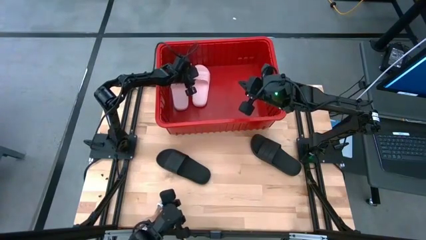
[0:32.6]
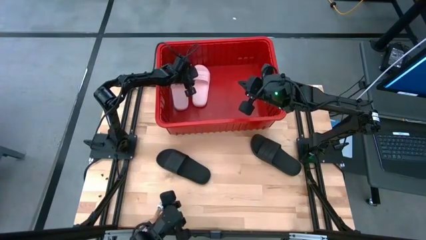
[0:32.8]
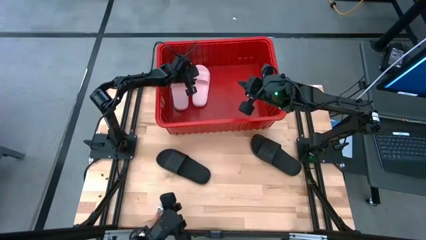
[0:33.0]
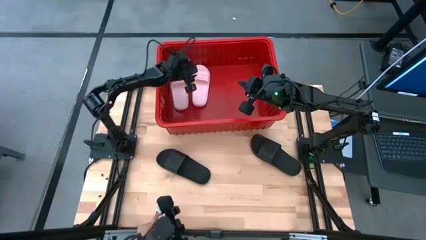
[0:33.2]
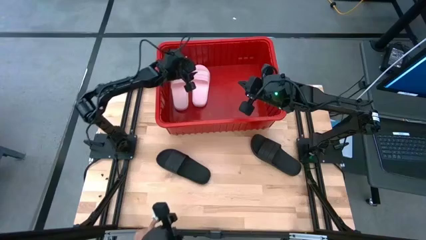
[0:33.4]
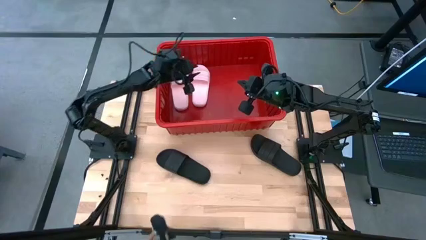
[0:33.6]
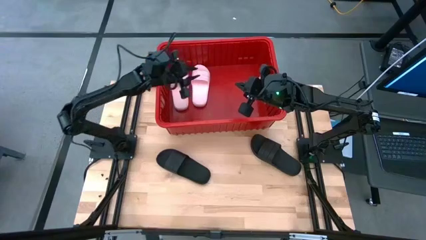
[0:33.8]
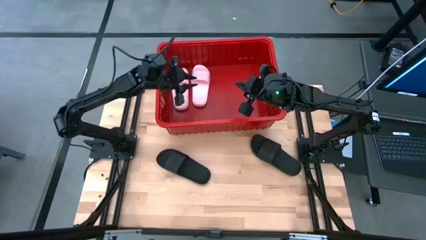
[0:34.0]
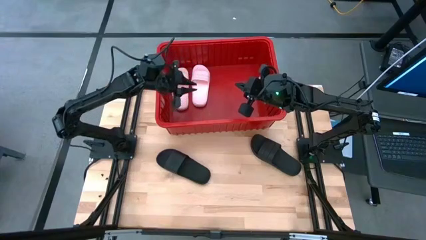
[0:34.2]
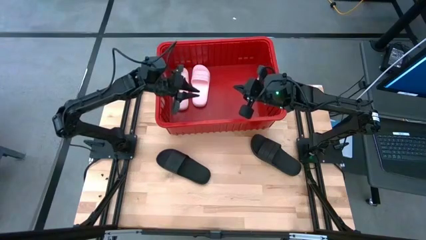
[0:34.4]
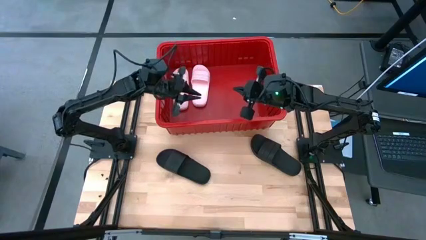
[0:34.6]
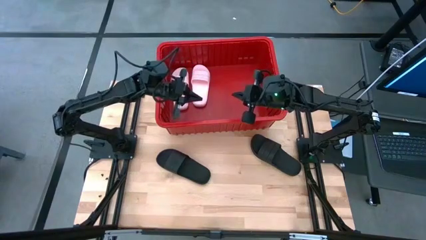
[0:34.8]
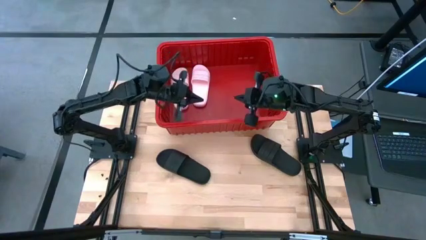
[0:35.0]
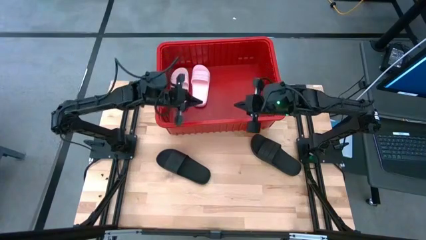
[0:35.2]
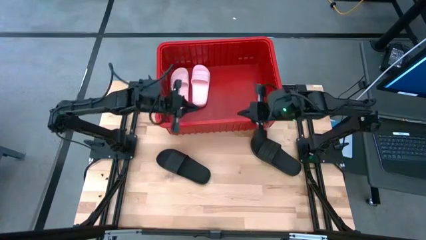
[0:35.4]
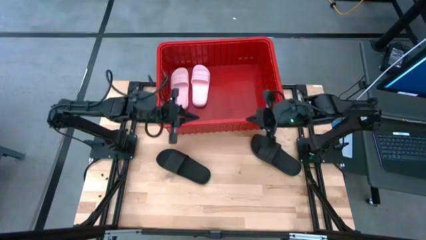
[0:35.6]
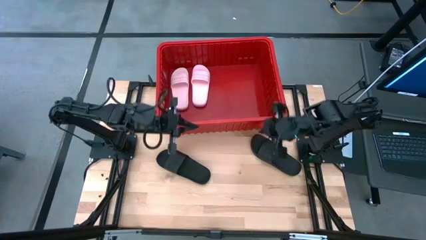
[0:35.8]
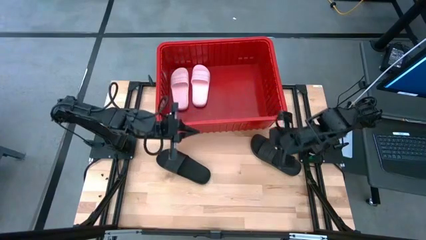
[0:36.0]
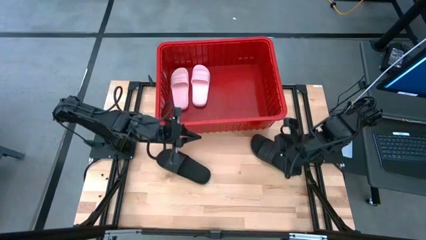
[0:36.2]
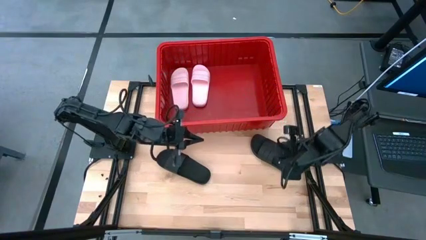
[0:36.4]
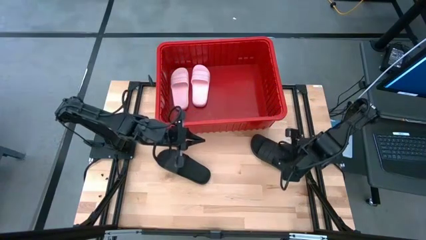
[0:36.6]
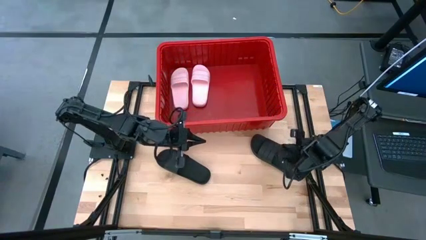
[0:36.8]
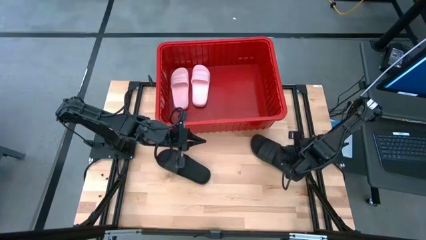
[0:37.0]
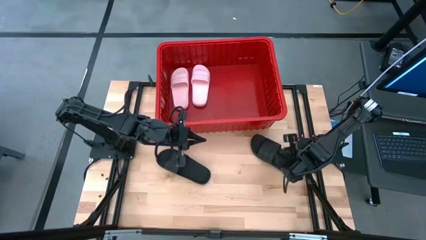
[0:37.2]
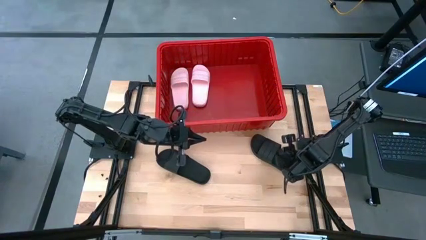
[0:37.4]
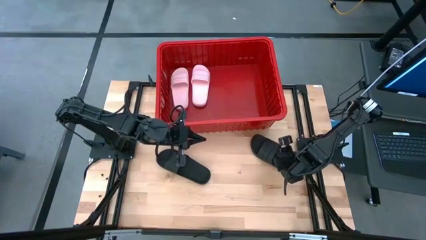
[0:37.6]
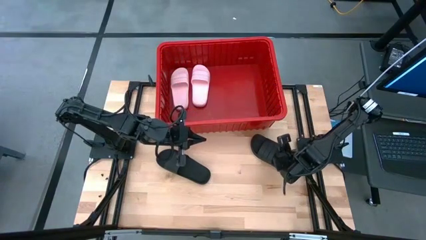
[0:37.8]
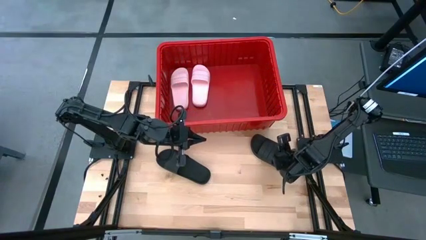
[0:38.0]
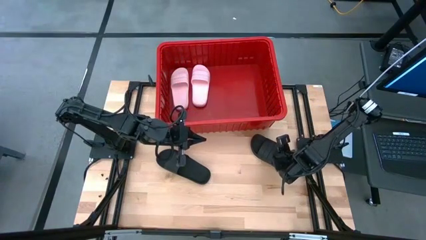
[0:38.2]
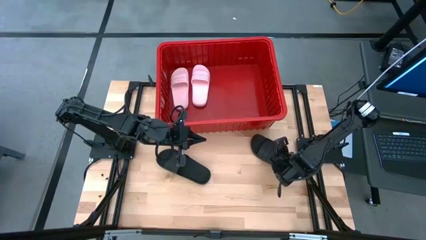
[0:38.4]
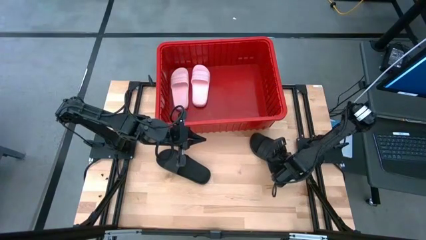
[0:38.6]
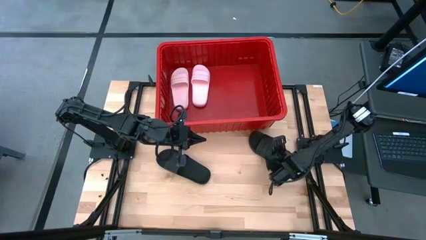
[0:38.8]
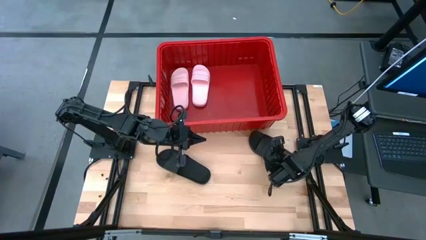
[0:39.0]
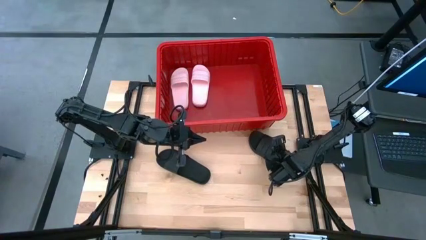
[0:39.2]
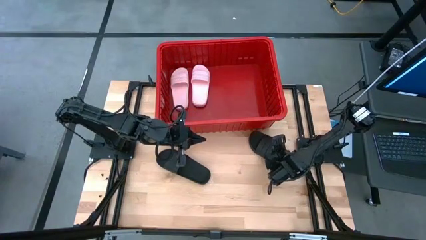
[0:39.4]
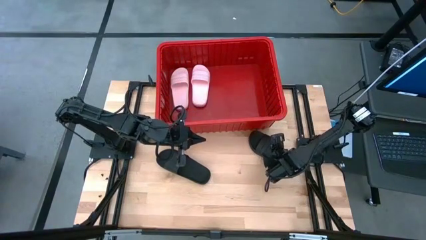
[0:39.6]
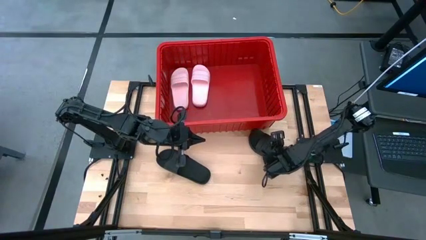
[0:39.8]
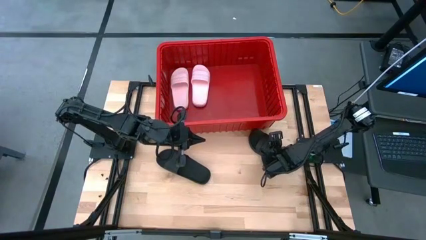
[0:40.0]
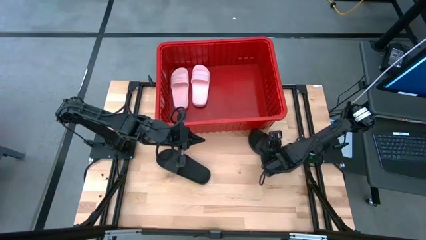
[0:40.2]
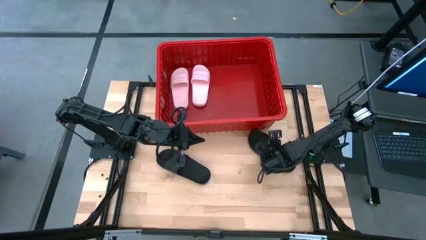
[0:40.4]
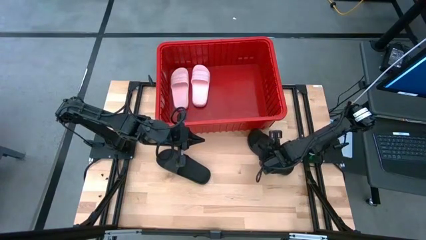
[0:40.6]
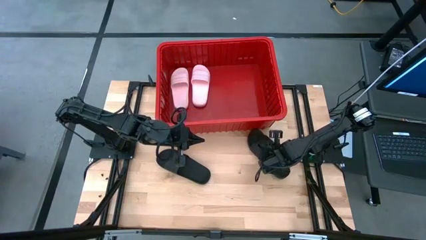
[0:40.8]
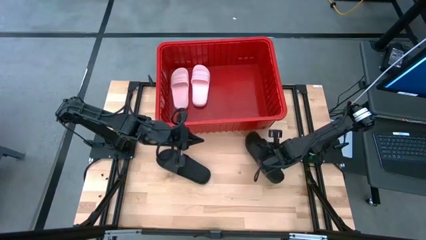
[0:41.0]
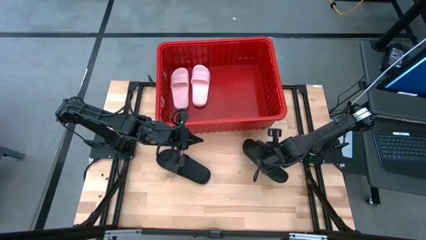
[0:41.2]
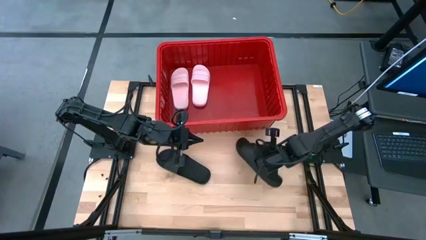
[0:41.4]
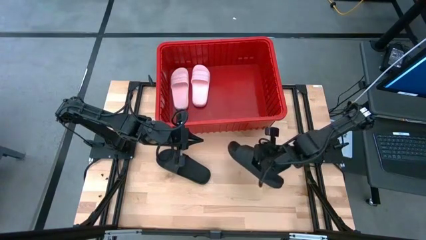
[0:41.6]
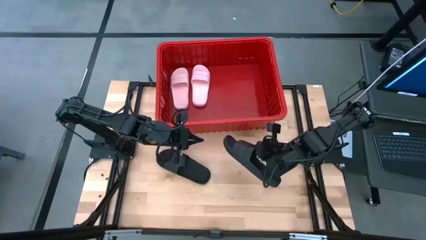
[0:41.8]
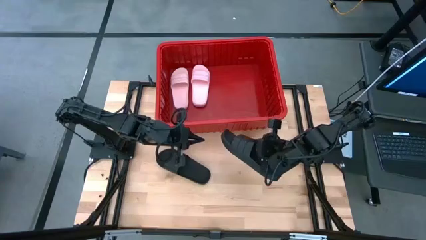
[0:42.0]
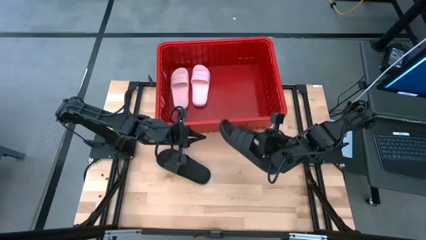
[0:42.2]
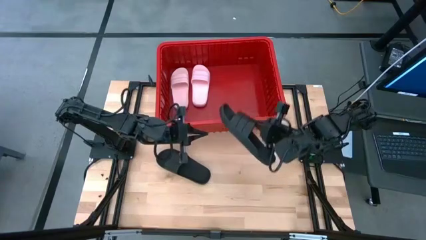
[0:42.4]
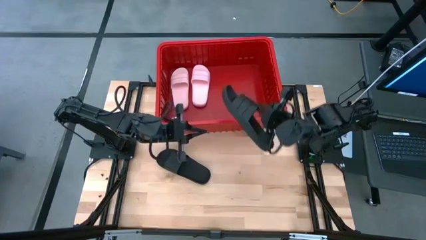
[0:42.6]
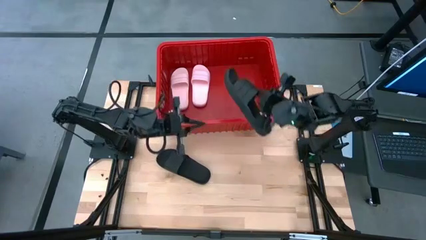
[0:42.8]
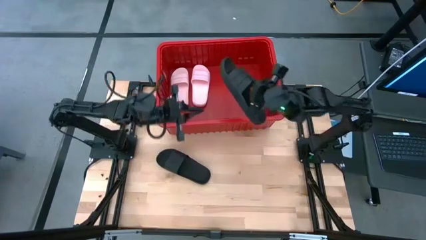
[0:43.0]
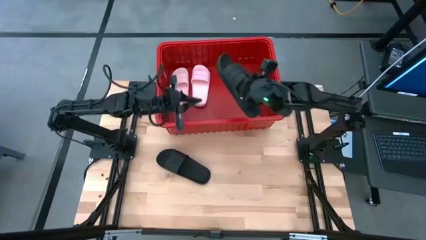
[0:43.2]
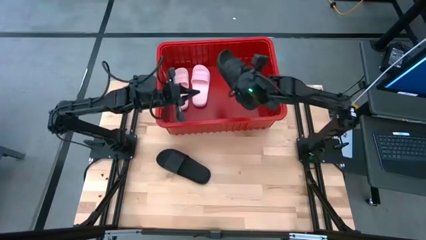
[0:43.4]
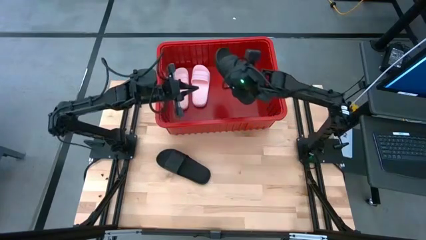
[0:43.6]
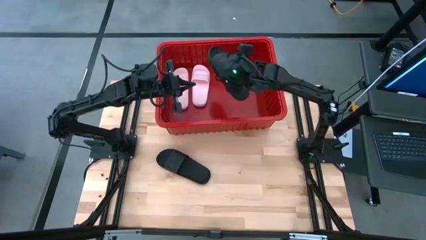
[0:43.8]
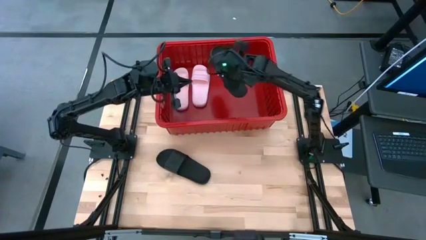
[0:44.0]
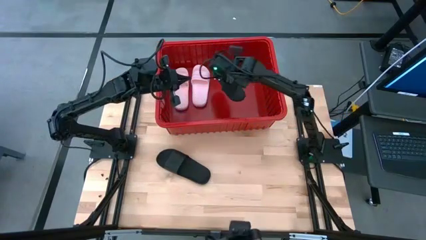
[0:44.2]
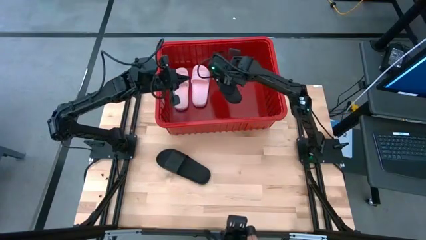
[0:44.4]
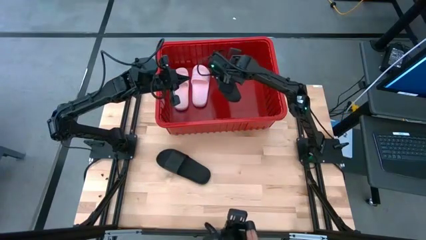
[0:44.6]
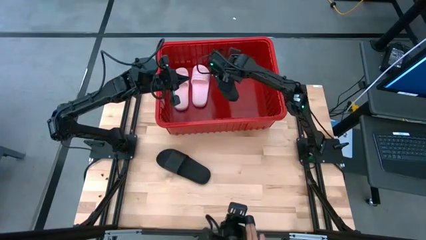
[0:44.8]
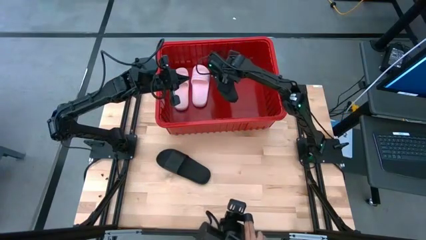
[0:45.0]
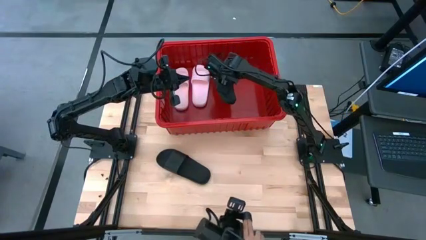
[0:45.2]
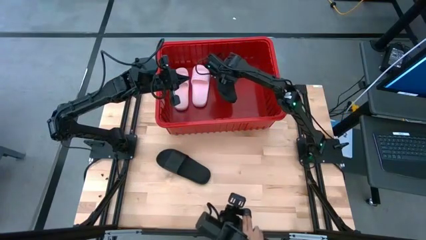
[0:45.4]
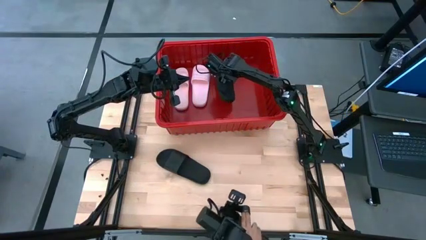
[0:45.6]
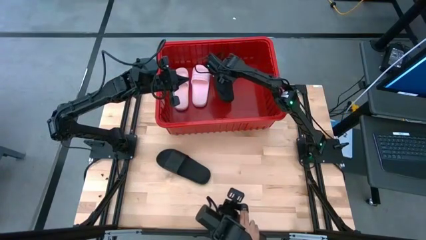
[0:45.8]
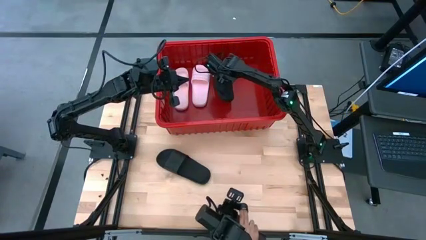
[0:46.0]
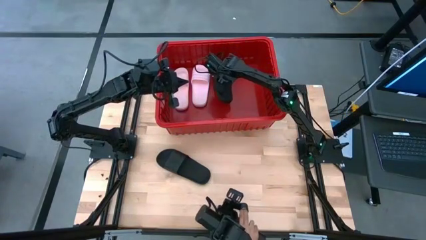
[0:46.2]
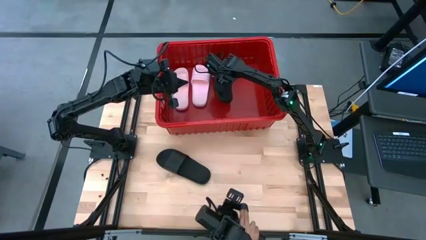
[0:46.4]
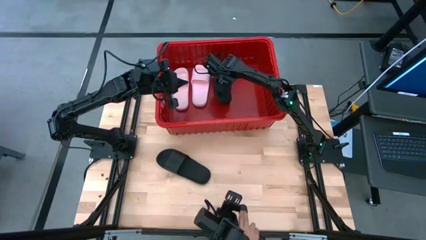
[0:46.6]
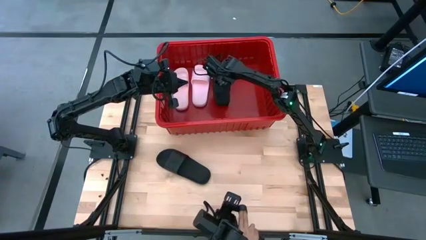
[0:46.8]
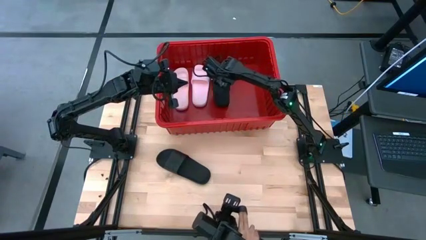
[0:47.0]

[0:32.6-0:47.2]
Task: Pick and place slides into bin
Put the right black slide into the red bin

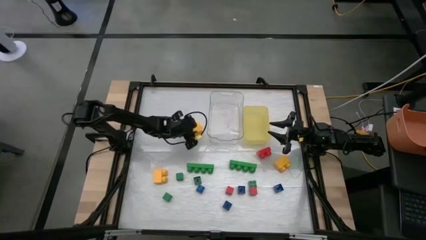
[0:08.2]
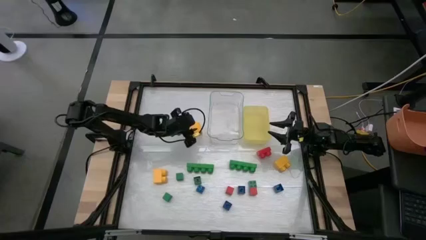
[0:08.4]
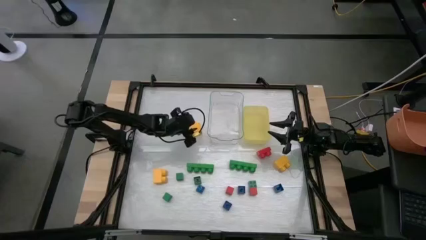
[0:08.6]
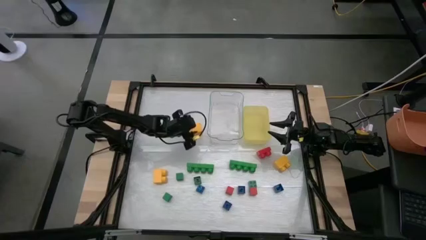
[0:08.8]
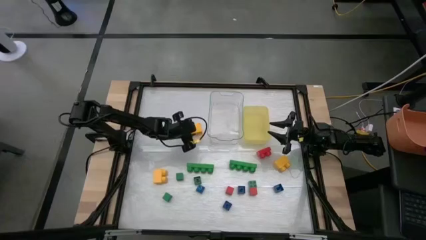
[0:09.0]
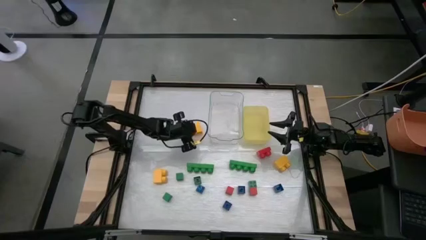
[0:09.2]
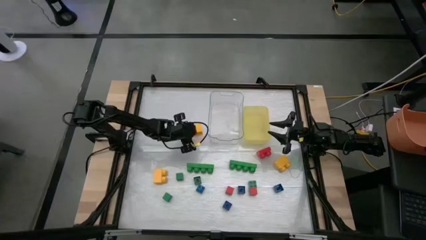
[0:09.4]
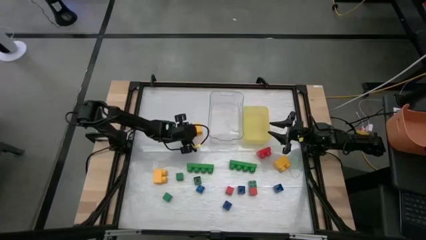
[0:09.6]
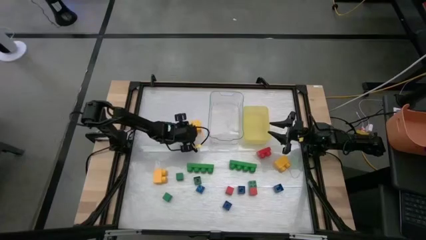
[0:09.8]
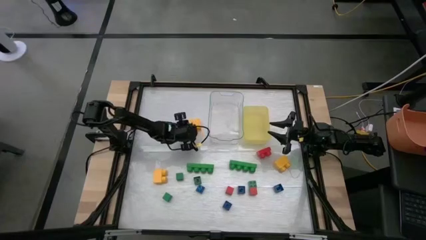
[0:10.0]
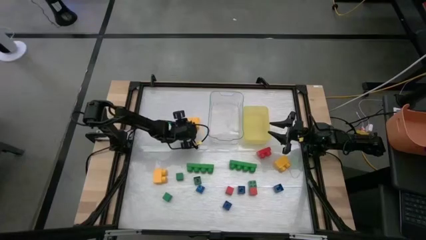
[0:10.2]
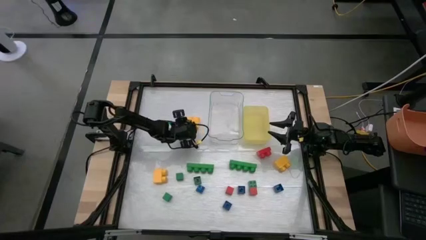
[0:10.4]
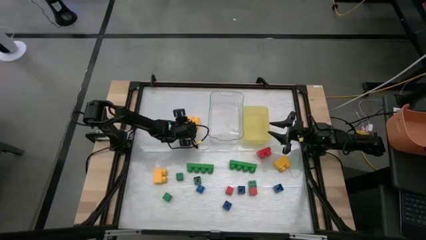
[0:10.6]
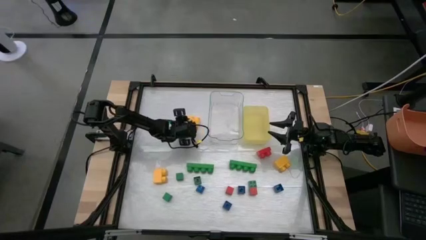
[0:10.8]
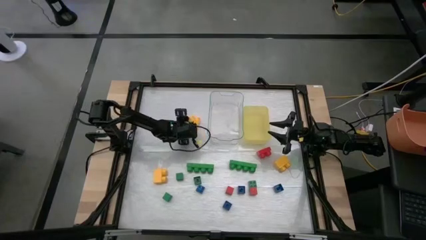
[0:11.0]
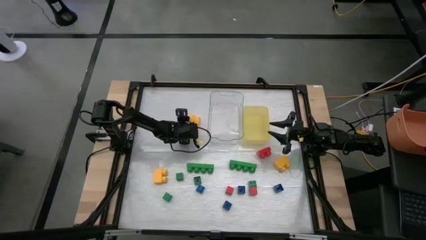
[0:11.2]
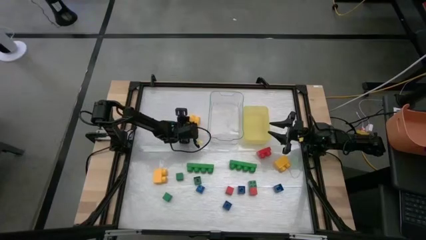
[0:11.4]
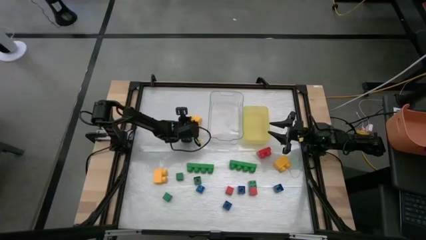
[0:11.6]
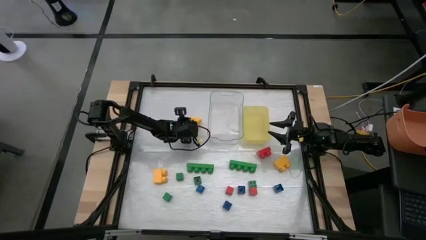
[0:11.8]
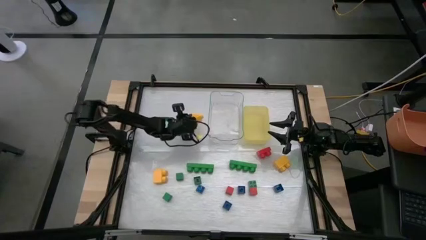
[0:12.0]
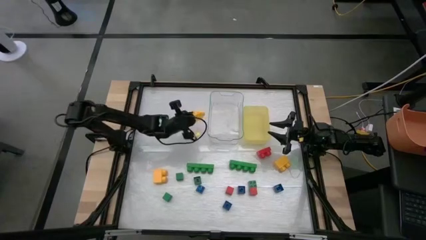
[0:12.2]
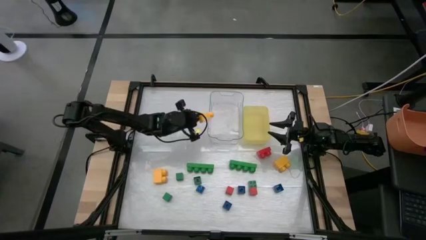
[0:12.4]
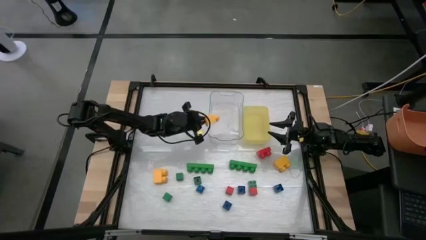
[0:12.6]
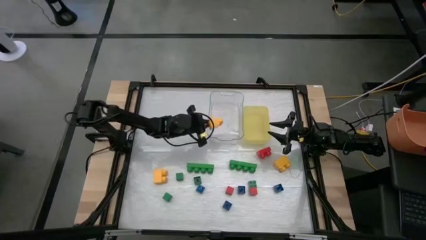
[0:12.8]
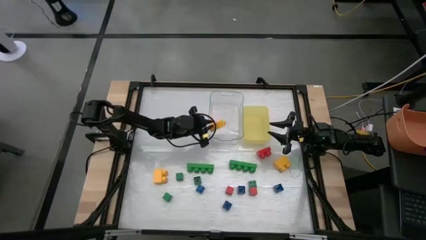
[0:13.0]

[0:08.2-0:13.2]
Task: Sort blocks by size
Put the large yellow game piece into the transparent bin
